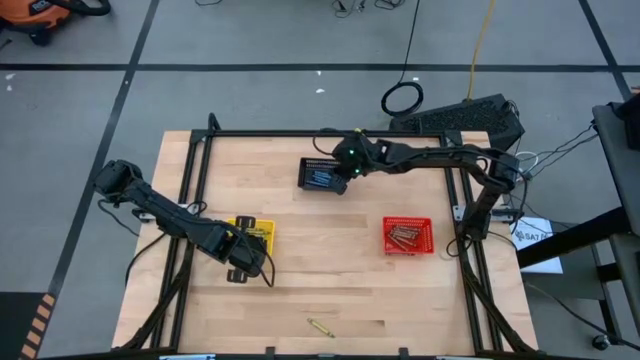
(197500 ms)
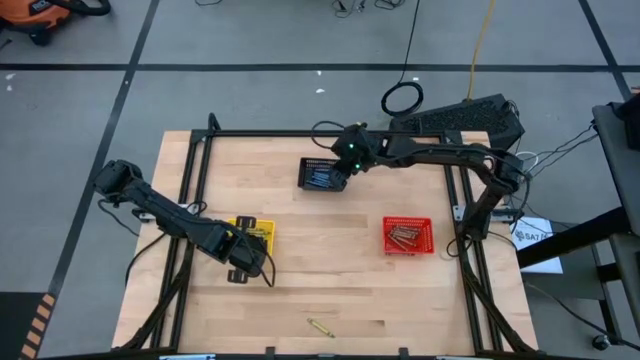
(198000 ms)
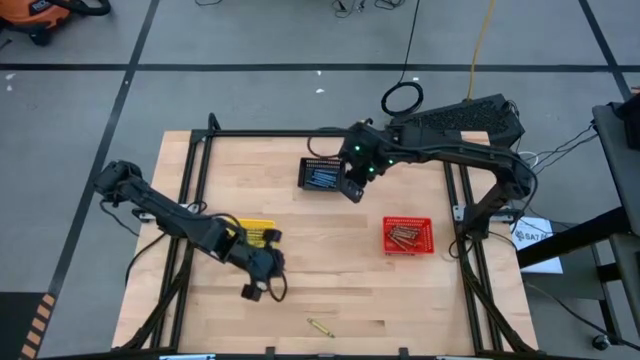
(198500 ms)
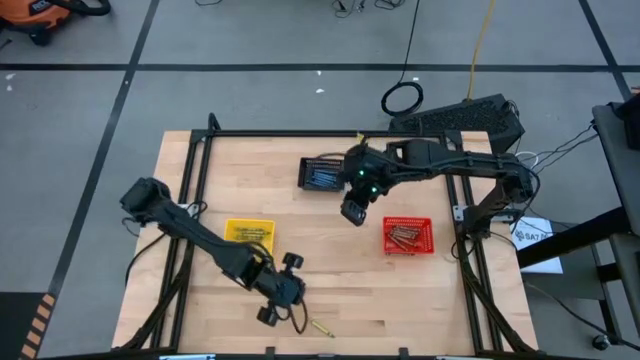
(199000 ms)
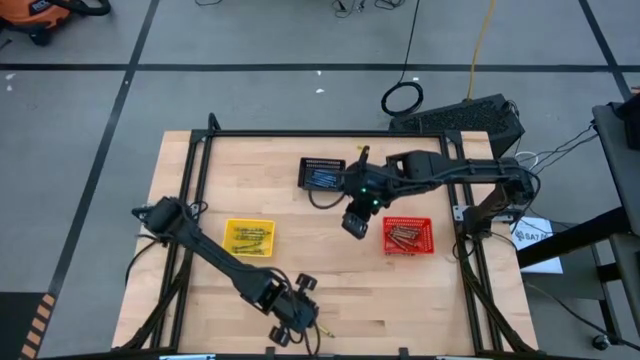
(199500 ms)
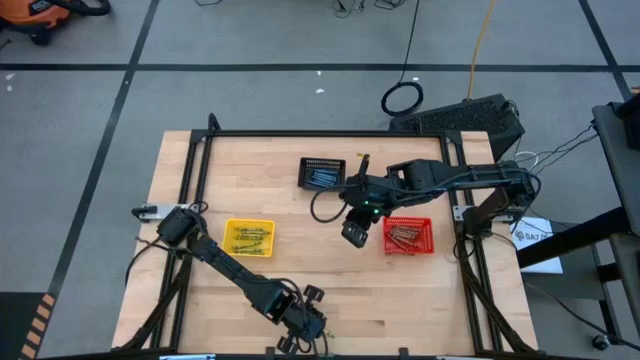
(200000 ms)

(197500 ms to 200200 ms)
Task: Sort crayons
Put the green crayon into the yellow bin

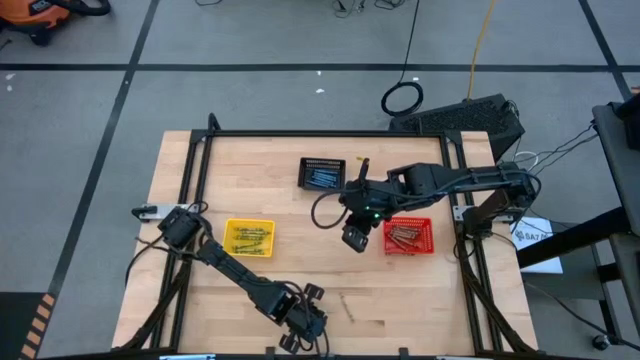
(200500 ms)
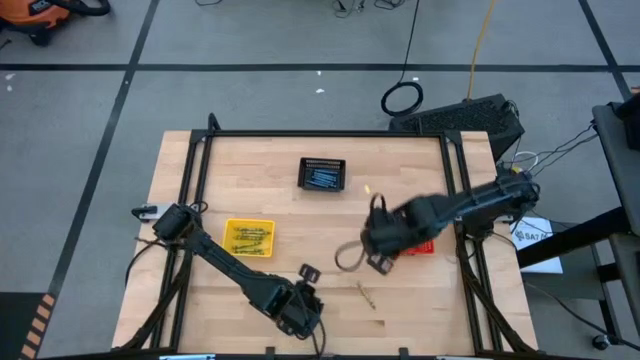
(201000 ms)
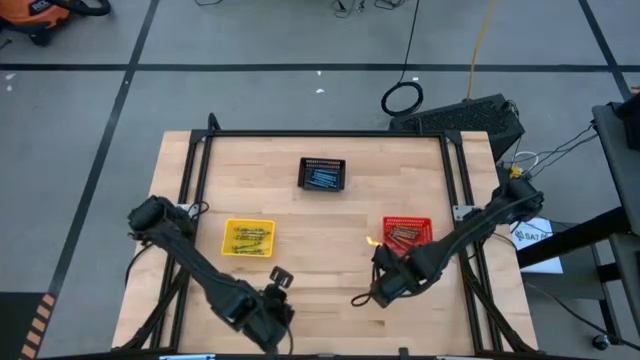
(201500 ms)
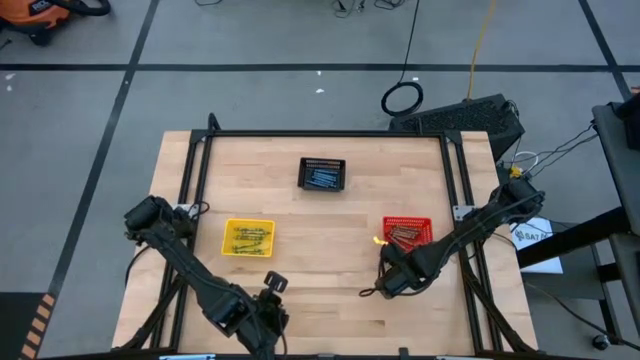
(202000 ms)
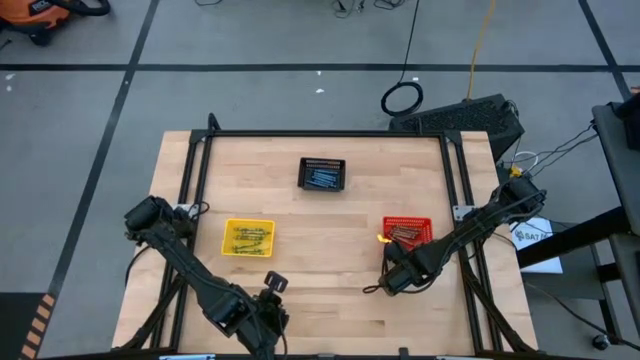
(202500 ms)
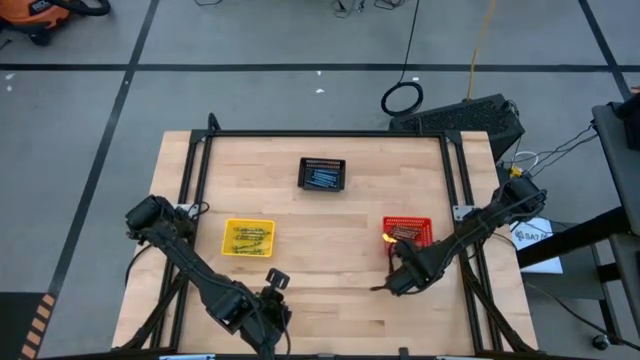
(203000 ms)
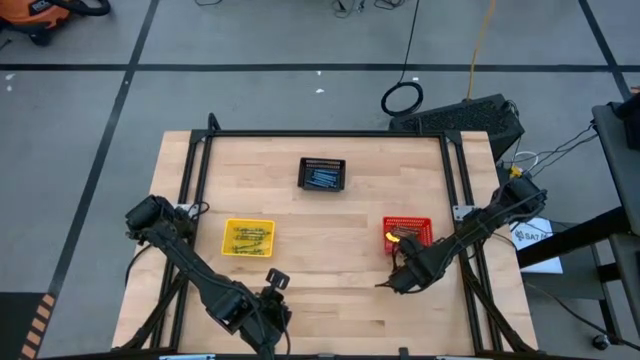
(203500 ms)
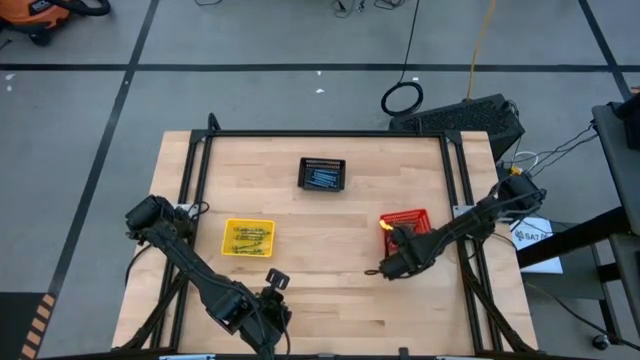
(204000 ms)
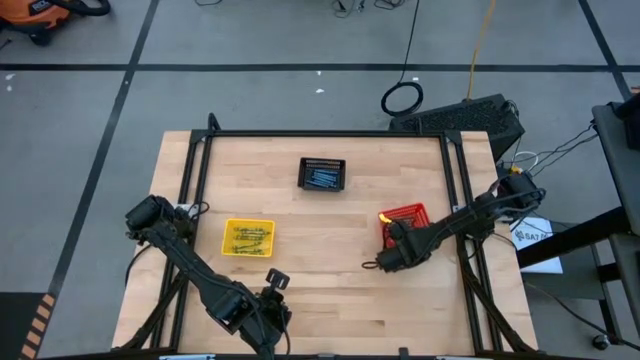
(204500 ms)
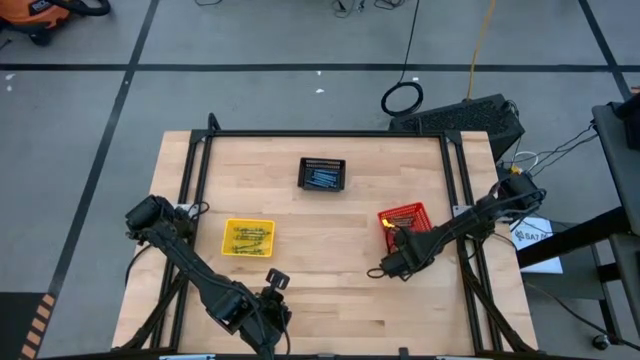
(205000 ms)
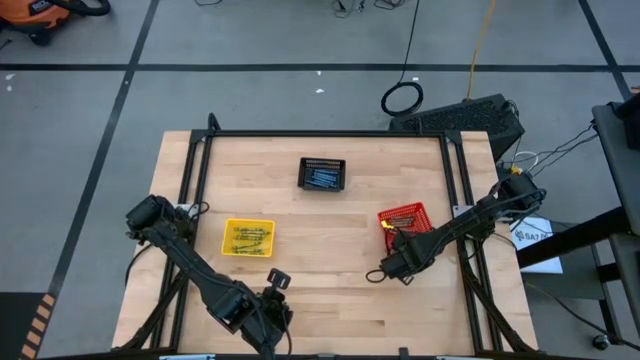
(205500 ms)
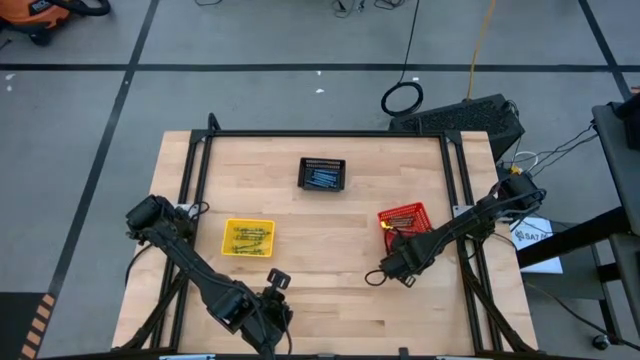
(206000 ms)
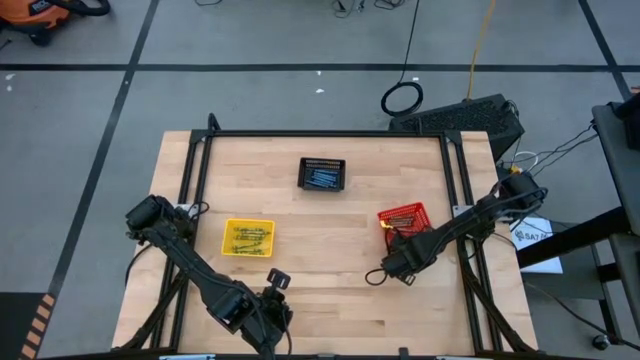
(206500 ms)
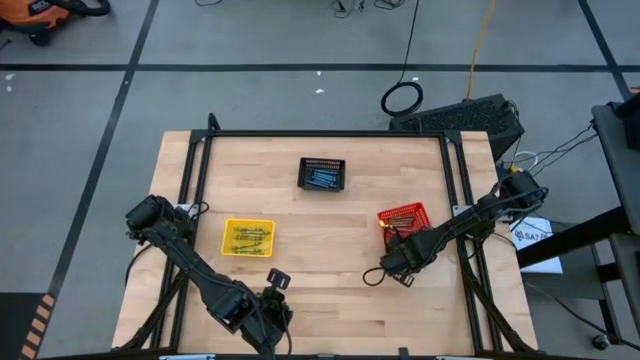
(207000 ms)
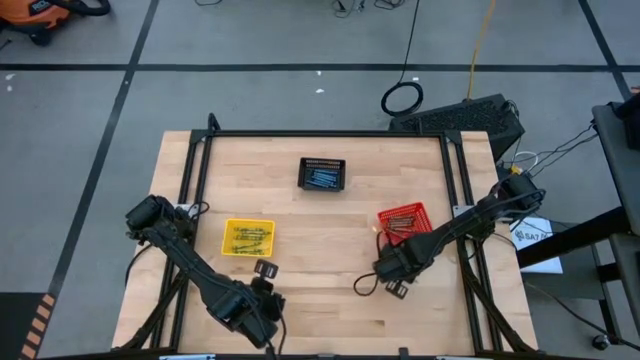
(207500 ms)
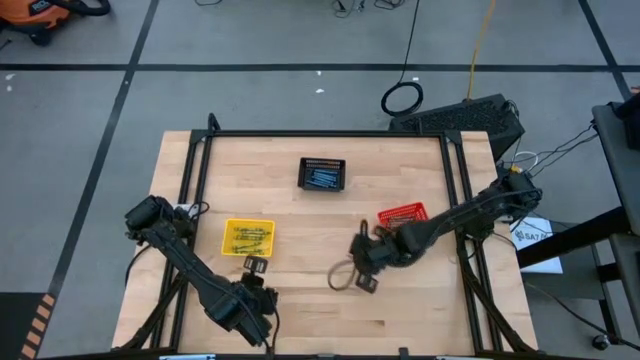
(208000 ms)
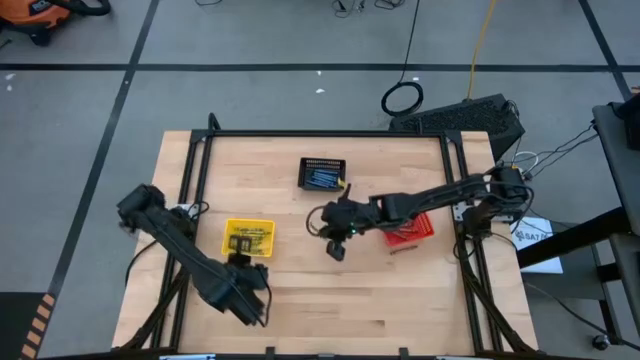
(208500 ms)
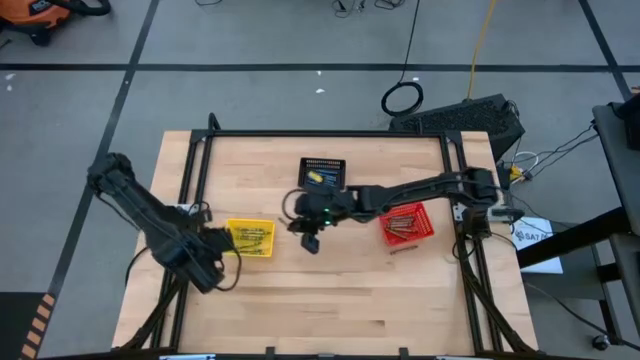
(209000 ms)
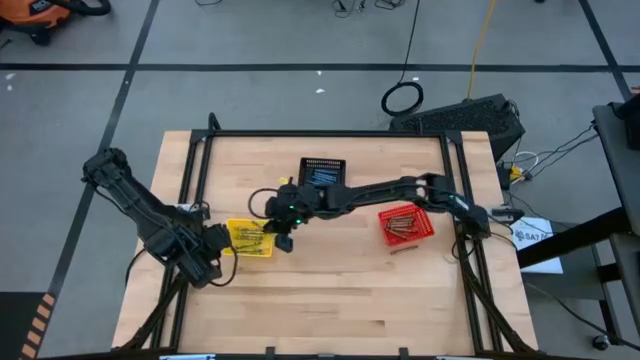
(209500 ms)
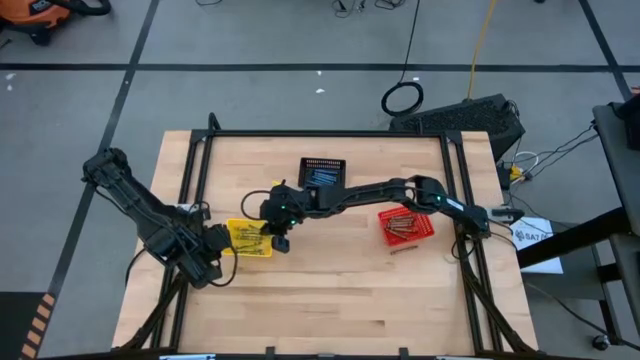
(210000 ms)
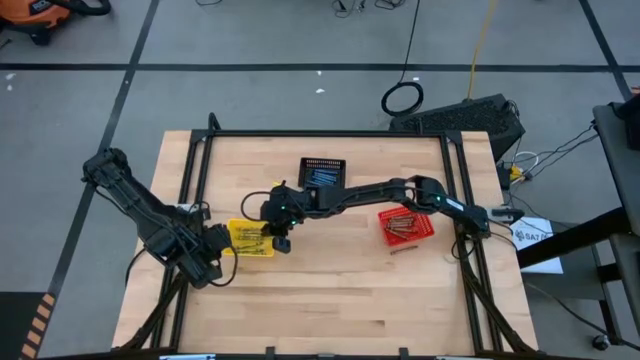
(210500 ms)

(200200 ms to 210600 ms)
Put the green crayon into the yellow bin

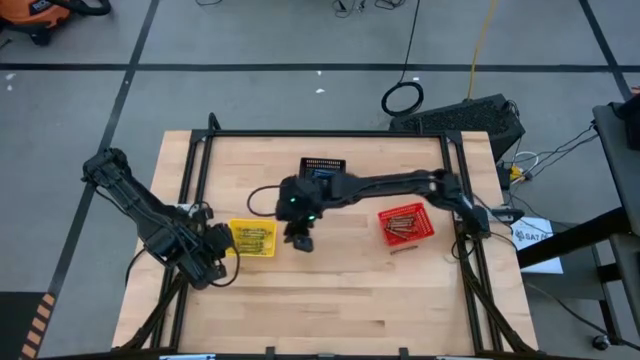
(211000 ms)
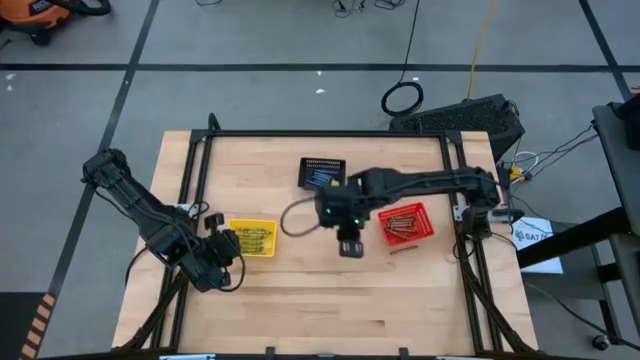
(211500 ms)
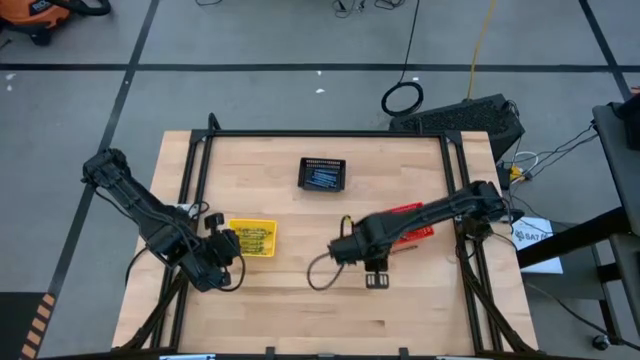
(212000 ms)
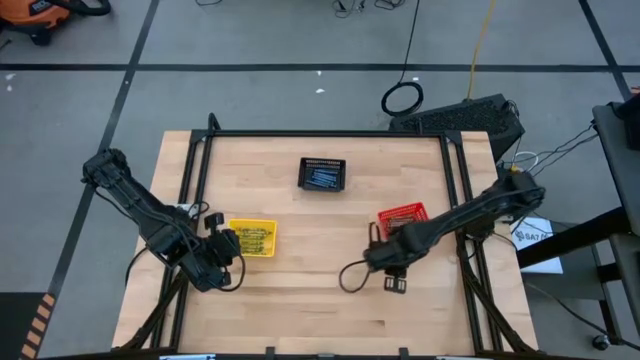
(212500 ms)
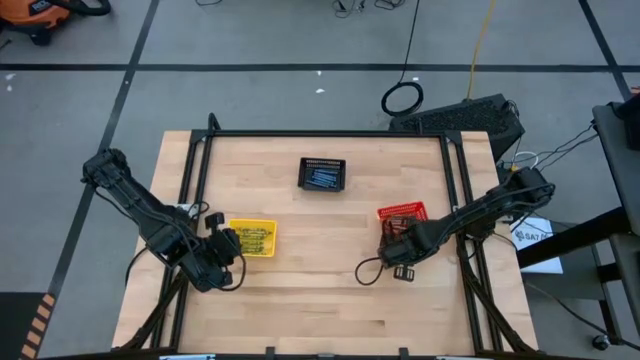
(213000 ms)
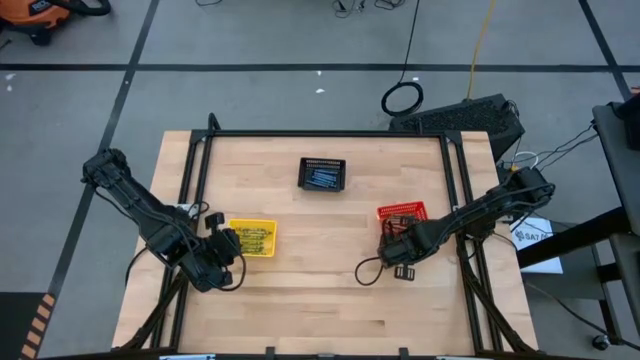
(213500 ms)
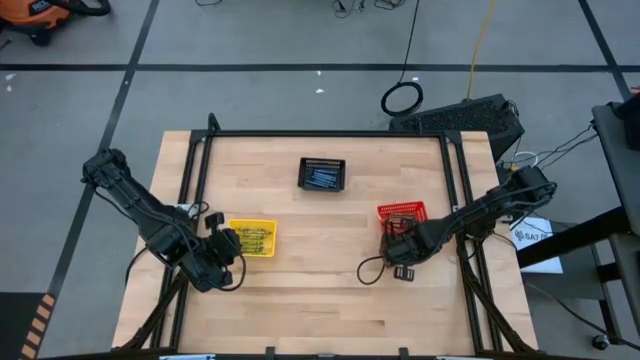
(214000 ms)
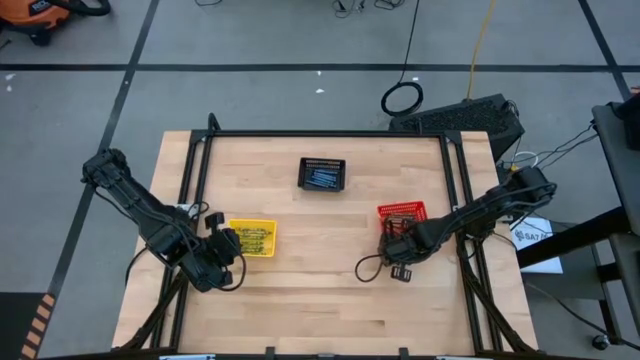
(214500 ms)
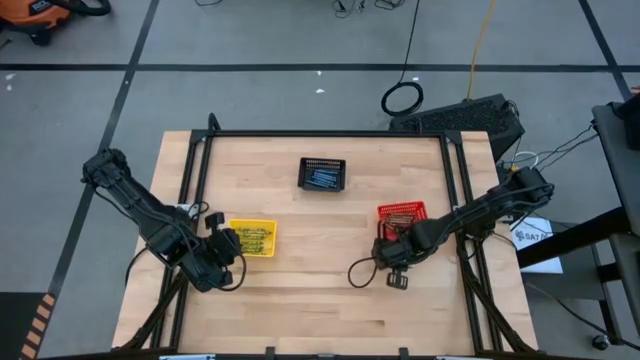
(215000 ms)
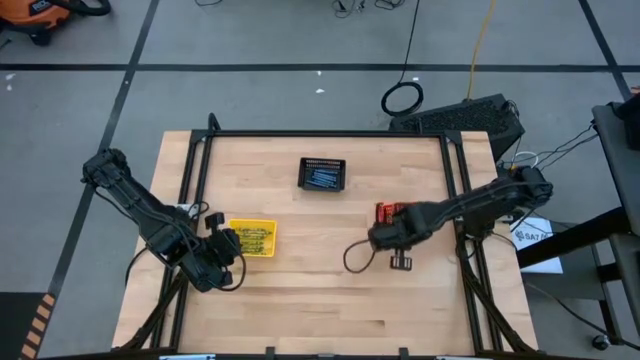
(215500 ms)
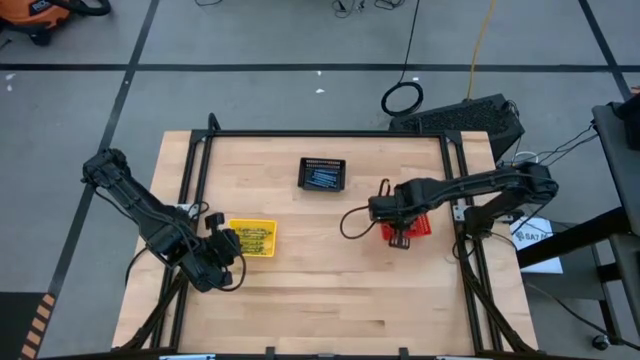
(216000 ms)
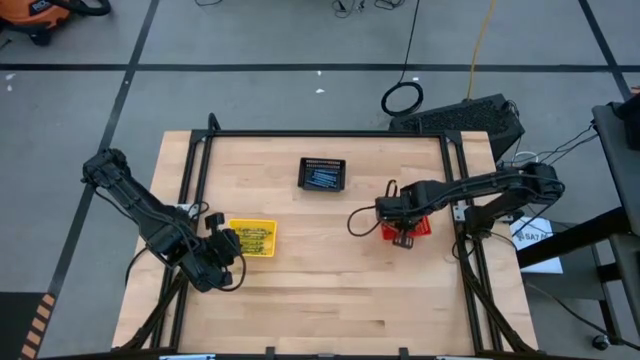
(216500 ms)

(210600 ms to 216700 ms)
Put the brown crayon into the red bin

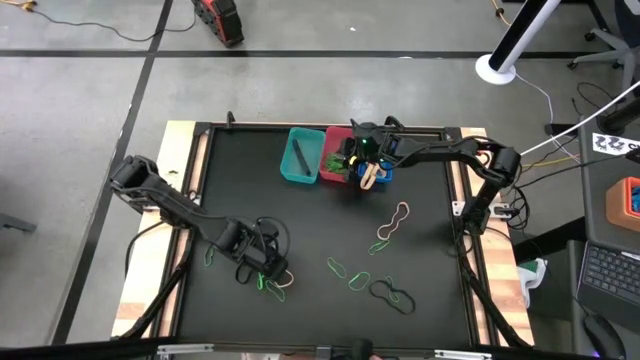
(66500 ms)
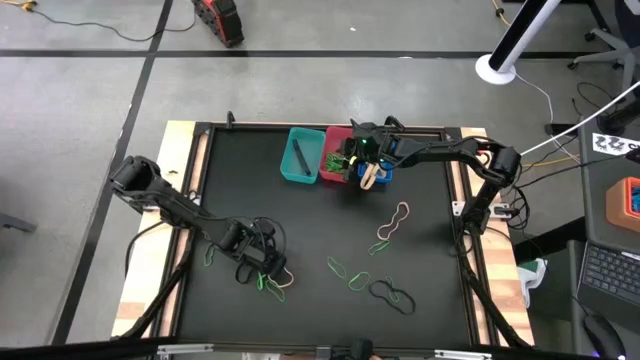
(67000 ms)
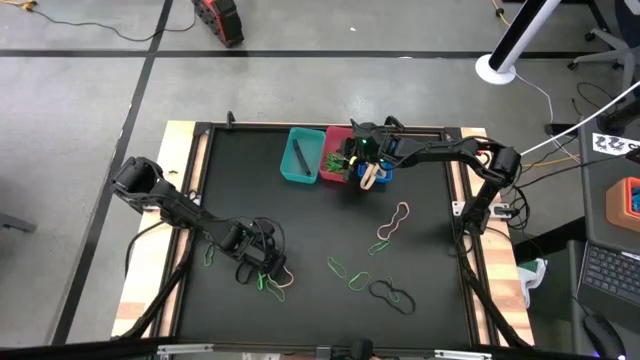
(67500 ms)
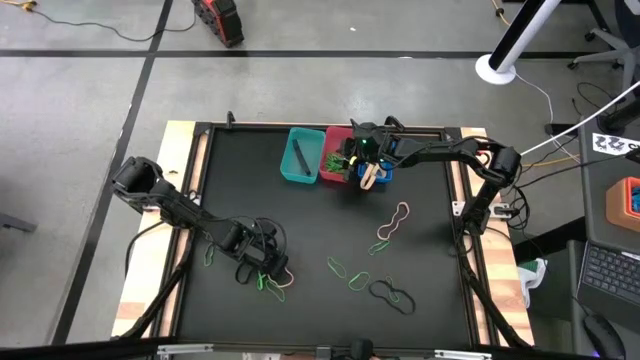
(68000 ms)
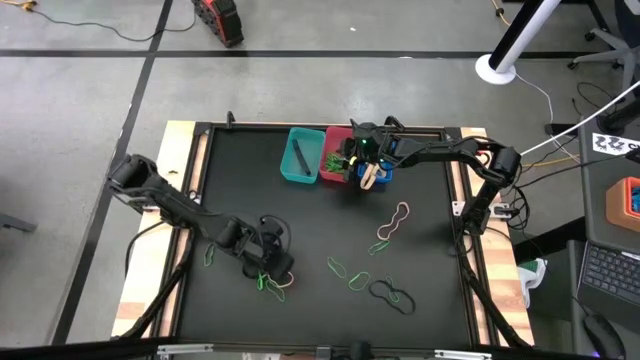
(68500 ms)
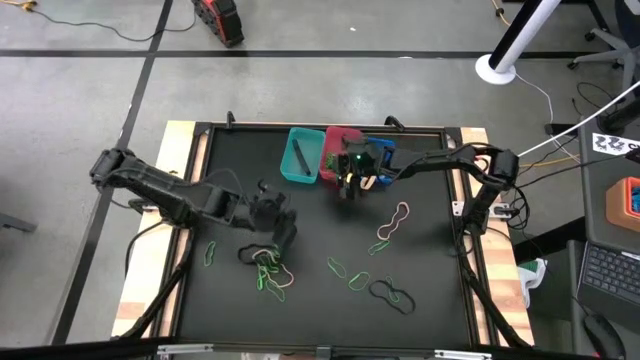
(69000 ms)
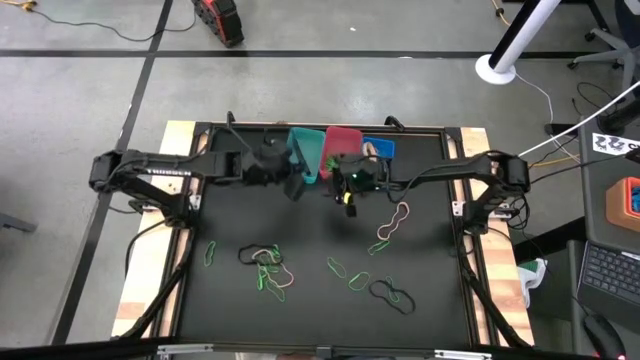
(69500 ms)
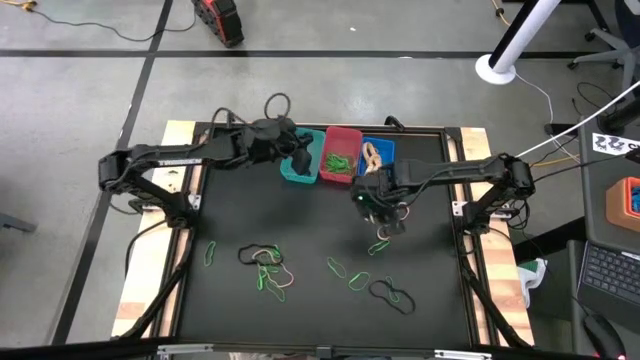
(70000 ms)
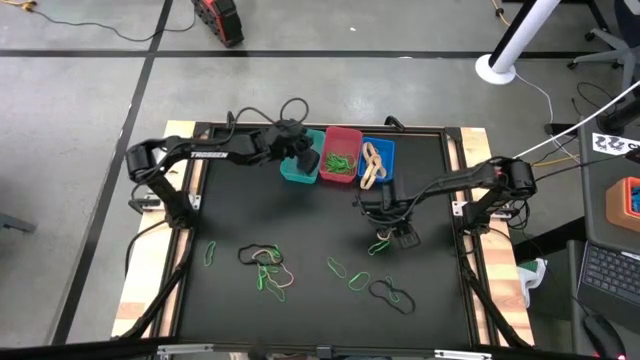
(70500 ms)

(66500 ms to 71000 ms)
Task: Sort rubber bands into baskets
Put the black rubber band into the light blue bin
